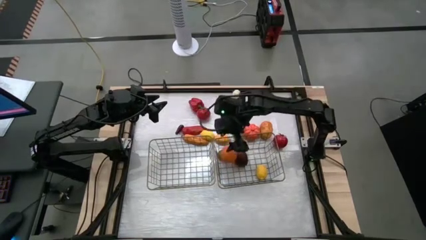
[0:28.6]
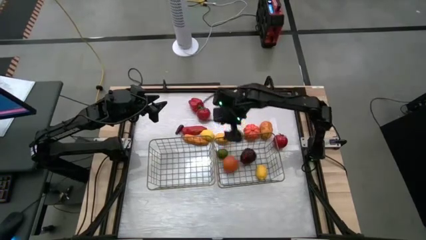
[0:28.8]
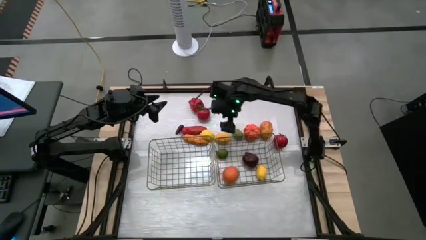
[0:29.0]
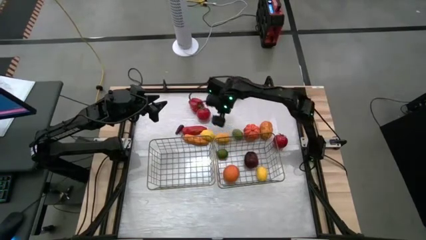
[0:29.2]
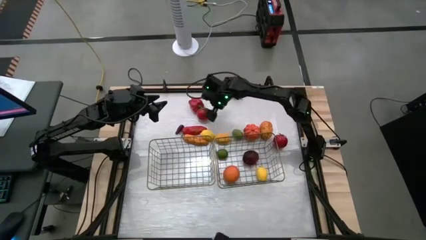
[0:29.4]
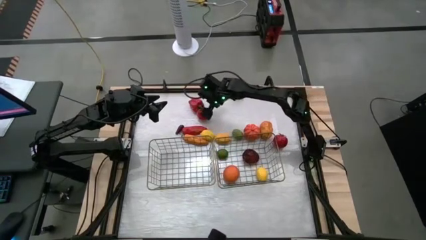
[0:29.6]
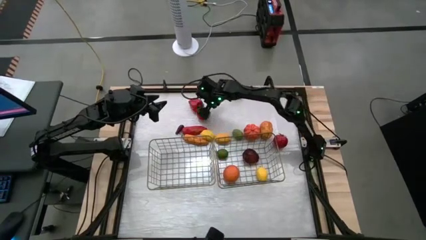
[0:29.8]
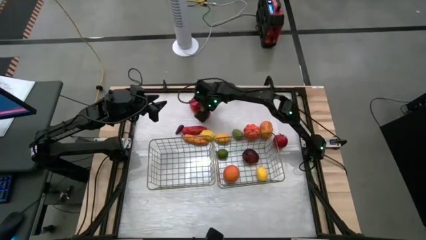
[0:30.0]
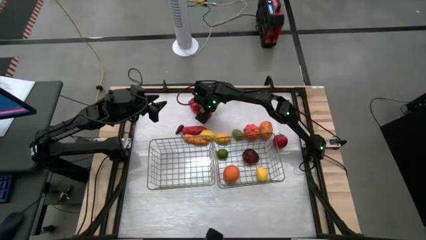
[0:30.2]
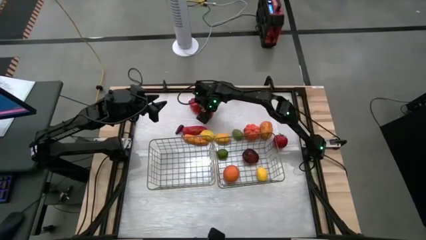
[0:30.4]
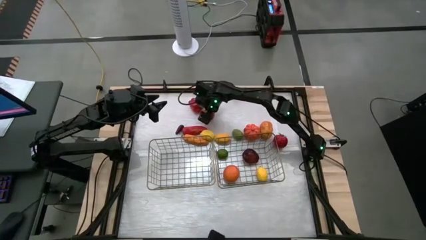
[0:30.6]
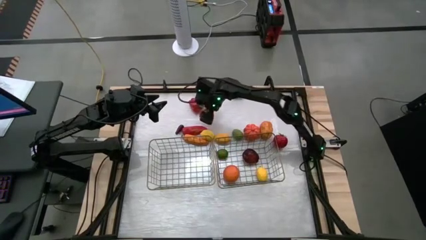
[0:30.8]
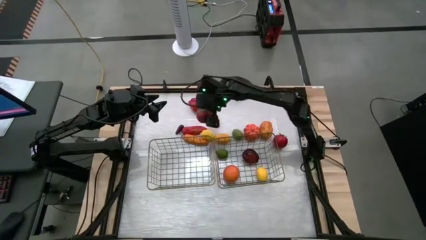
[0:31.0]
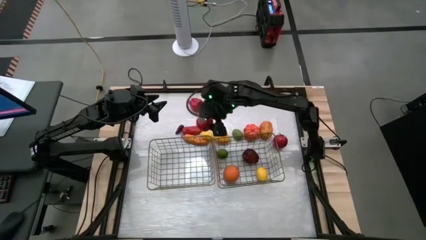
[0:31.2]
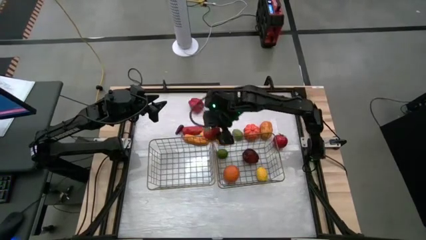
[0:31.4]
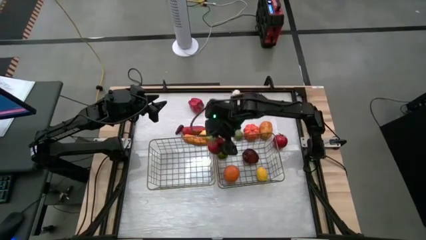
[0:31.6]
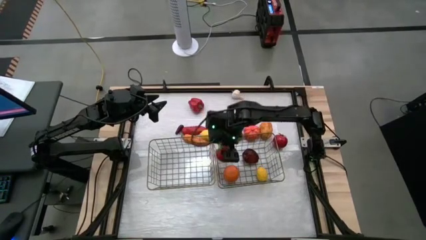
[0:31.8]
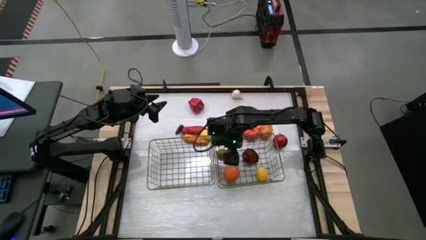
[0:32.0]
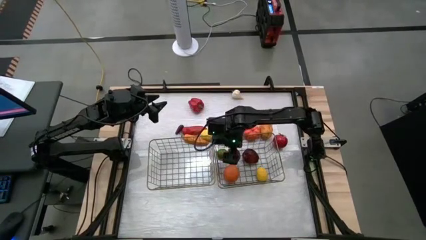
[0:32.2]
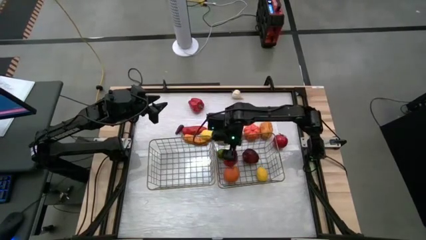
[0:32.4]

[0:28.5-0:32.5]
Task: Sort produce into baskets
Put the top tomato into the right wire basket

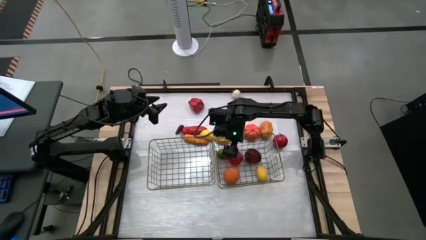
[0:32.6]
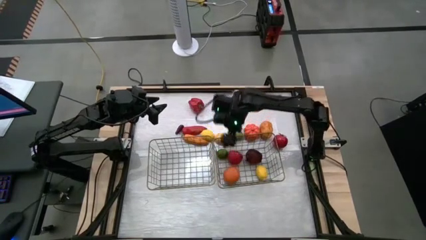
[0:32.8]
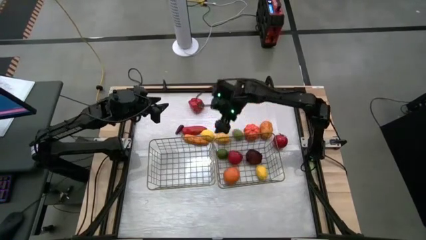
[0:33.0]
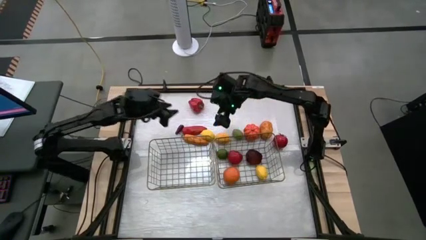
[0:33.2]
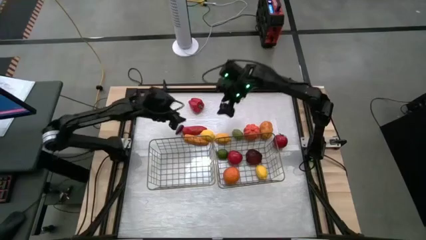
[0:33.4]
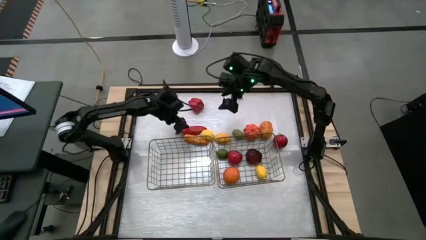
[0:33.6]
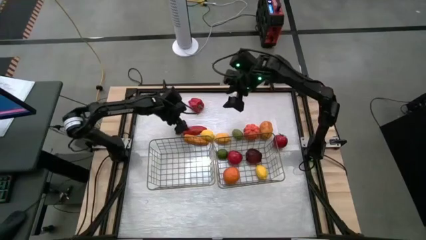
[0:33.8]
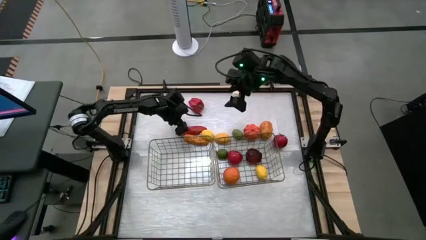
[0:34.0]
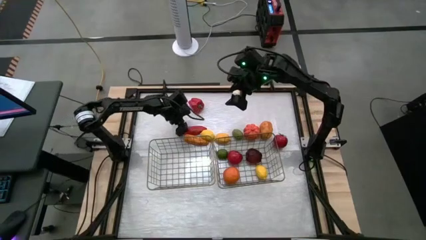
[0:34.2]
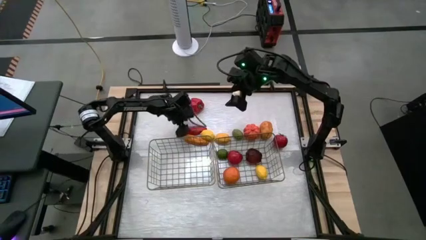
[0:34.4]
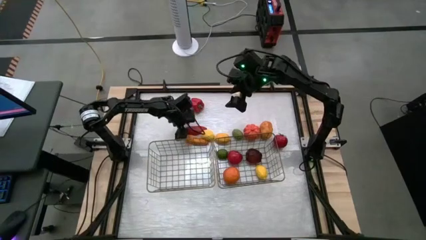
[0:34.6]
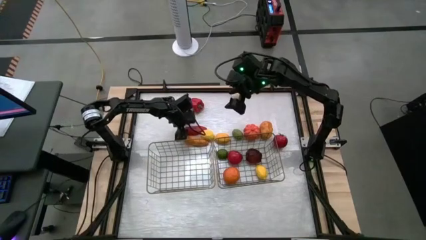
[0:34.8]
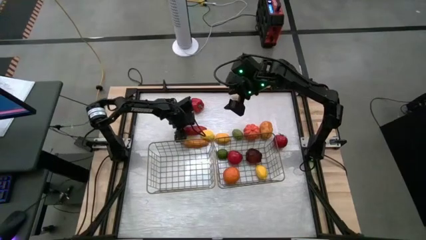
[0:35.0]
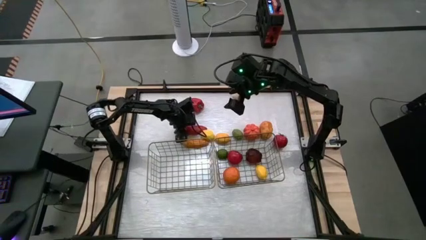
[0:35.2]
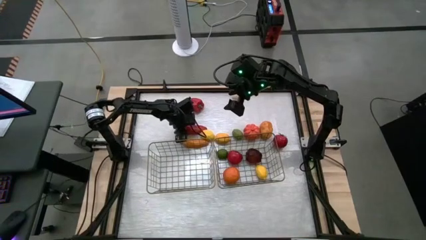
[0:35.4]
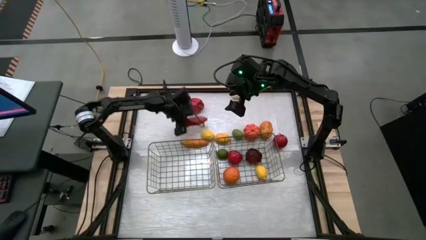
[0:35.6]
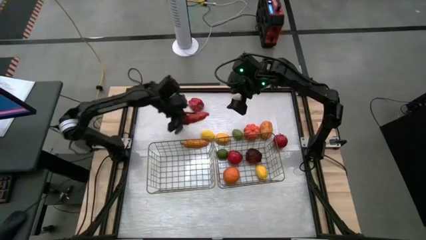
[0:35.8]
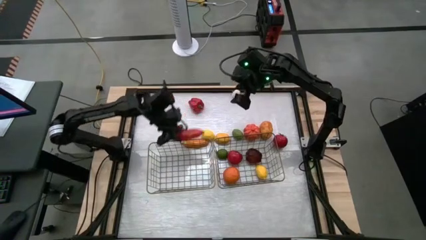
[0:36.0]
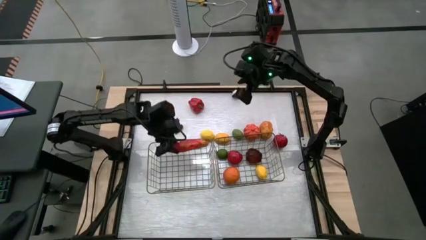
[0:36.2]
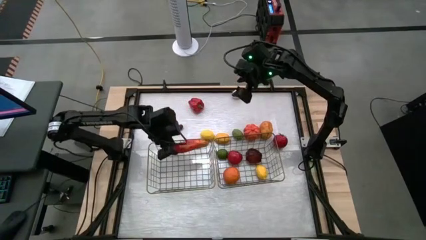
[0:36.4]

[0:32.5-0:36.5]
Put the red chili pepper into the left wire basket

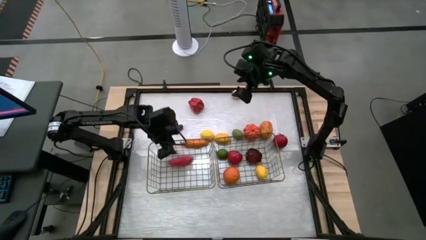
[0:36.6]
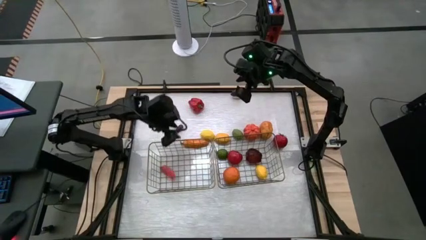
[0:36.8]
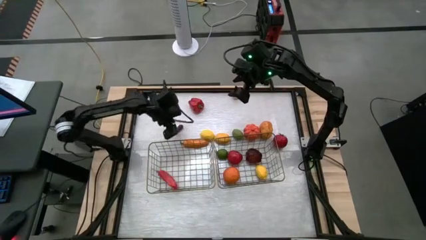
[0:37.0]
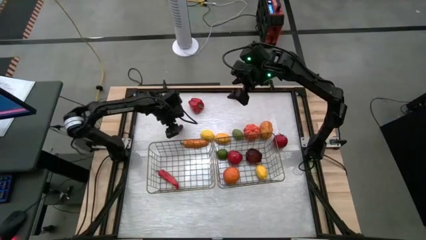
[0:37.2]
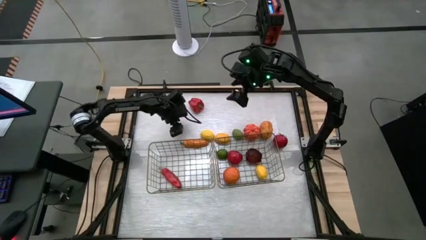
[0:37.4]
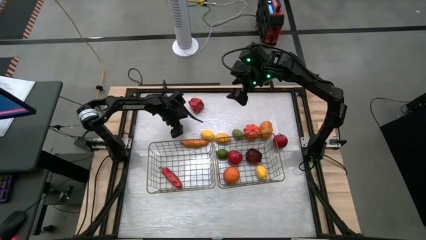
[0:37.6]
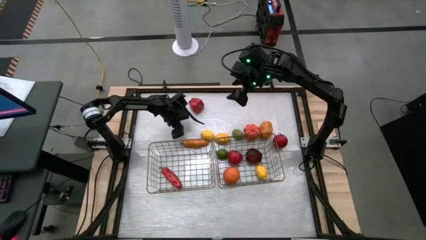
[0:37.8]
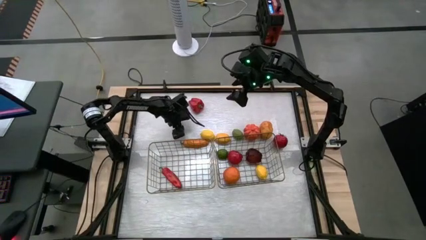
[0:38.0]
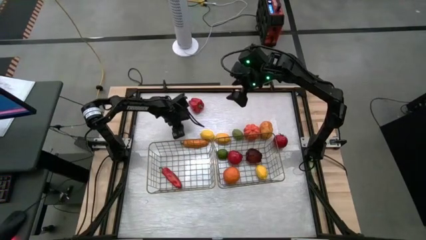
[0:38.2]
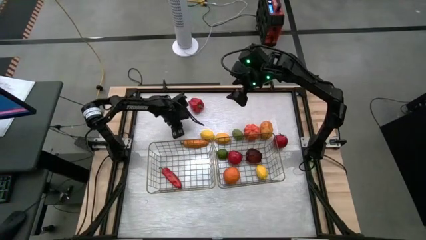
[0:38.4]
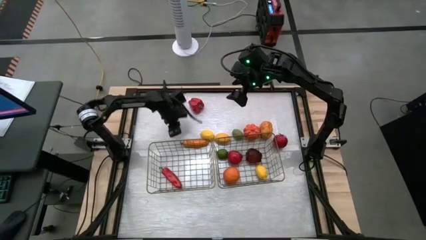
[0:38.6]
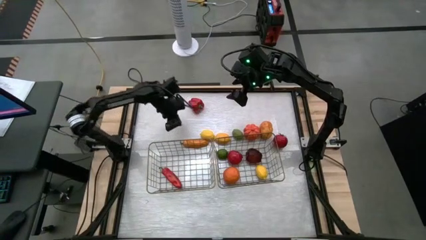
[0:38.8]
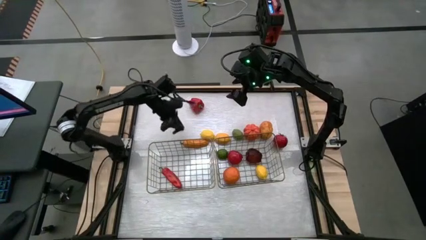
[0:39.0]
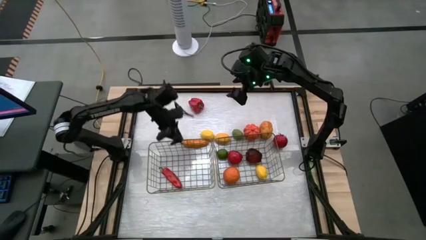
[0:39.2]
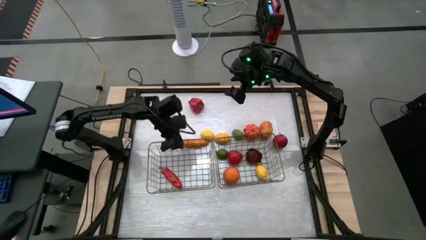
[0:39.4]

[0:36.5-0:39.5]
Put the eggplant into the left wire basket

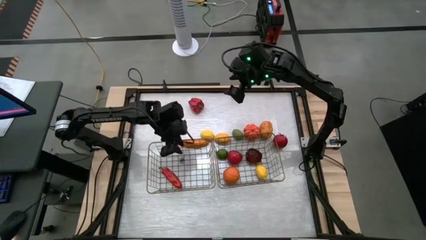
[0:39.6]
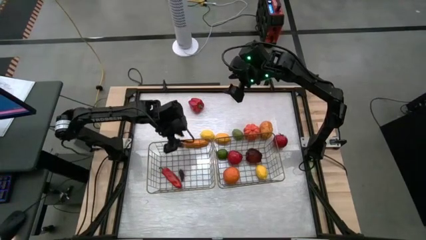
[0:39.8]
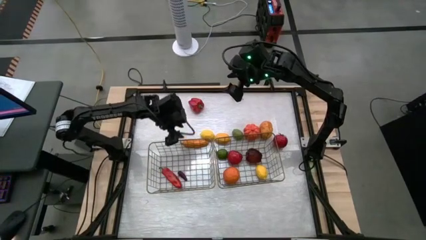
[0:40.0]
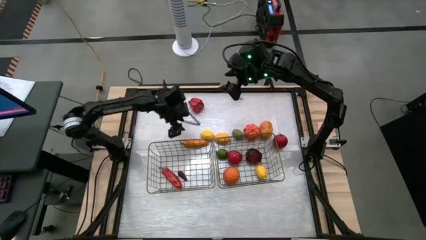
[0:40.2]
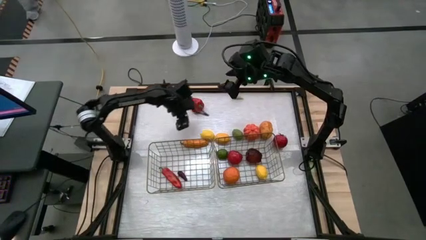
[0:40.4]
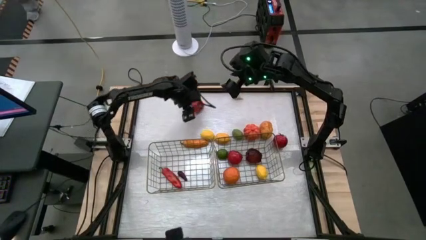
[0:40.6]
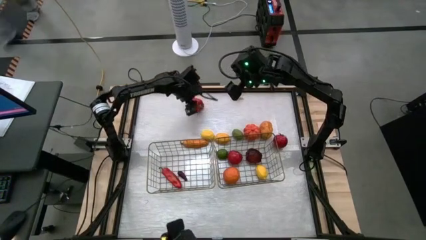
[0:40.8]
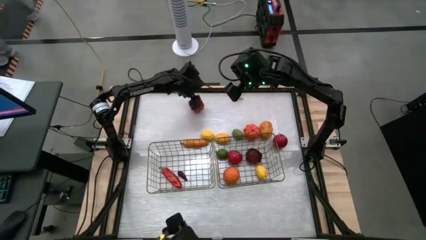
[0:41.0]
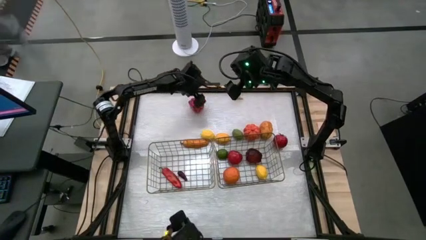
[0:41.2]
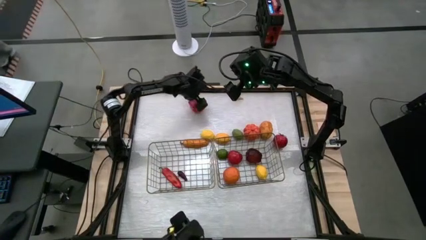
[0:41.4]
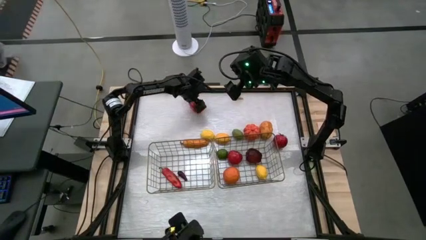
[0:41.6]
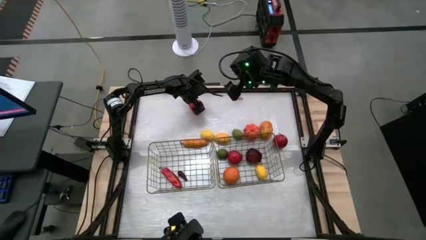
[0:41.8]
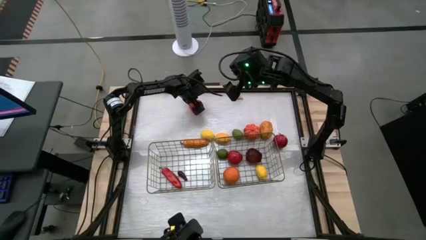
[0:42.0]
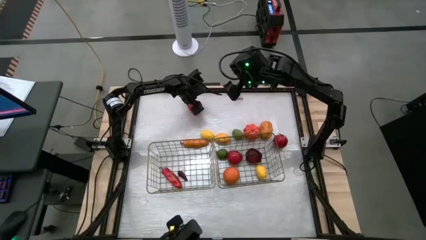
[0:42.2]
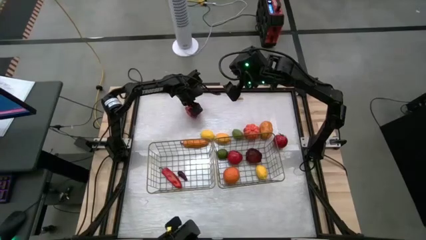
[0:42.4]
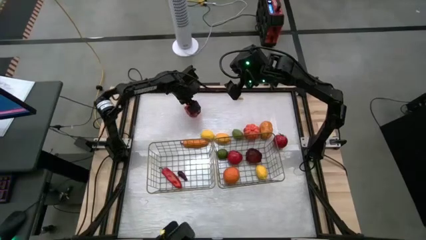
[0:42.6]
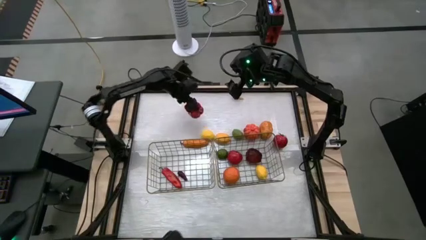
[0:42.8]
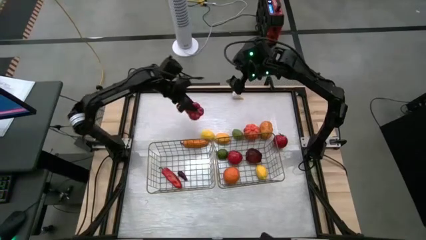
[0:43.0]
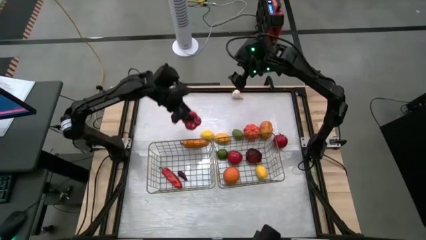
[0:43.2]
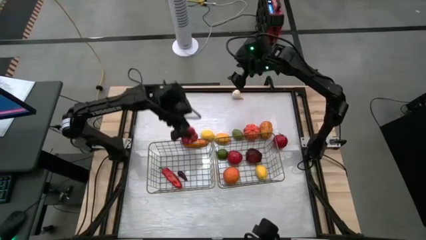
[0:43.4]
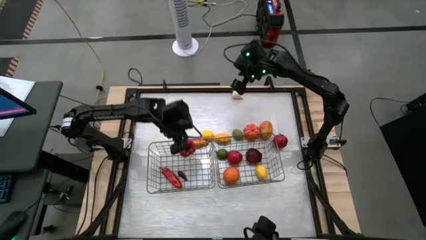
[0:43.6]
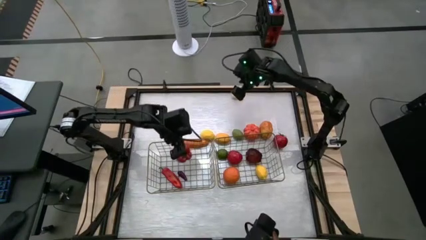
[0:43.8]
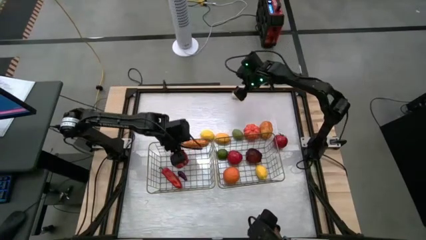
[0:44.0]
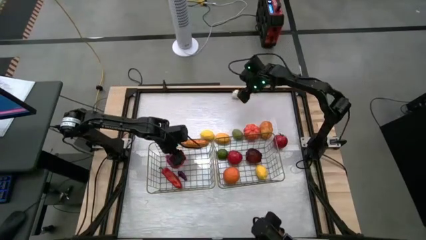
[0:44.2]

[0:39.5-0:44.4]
Put the red bell pepper into the left wire basket

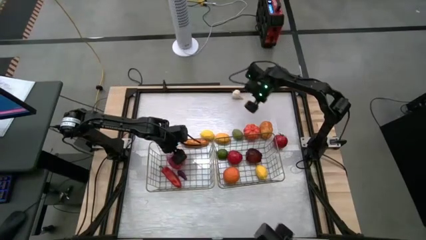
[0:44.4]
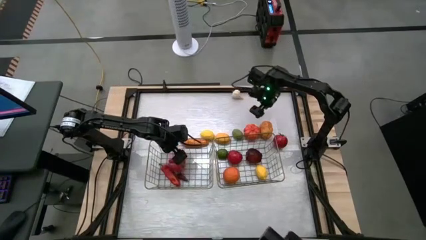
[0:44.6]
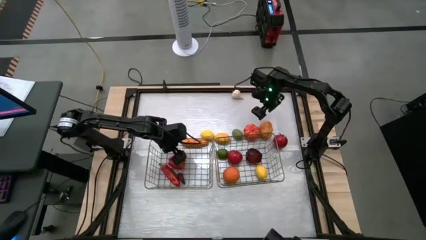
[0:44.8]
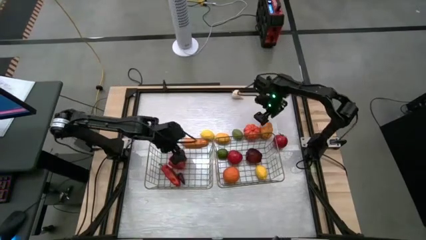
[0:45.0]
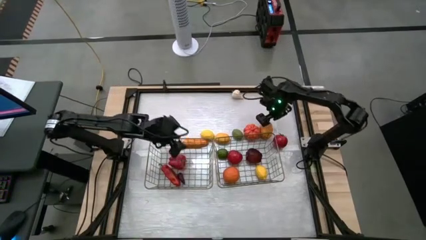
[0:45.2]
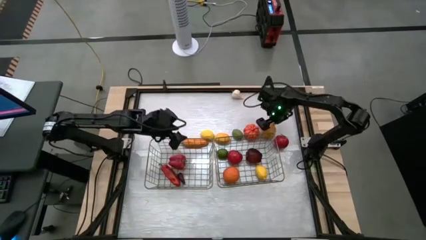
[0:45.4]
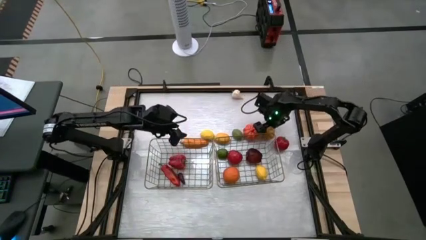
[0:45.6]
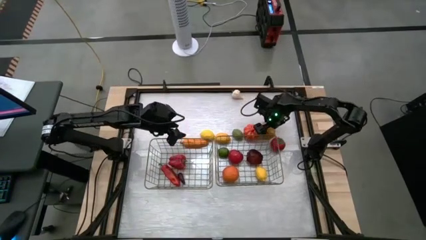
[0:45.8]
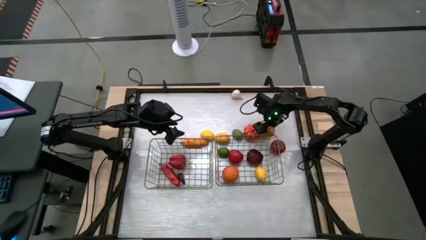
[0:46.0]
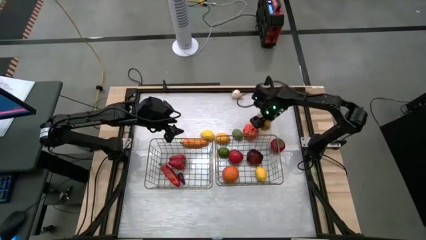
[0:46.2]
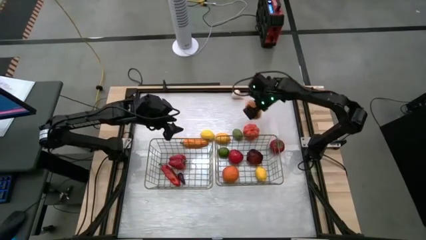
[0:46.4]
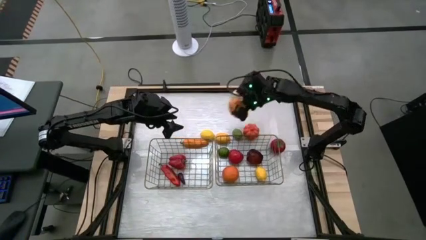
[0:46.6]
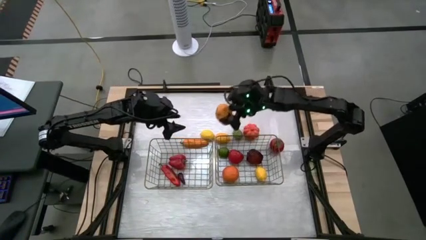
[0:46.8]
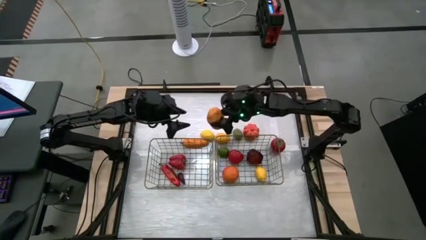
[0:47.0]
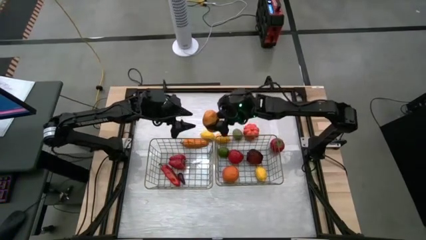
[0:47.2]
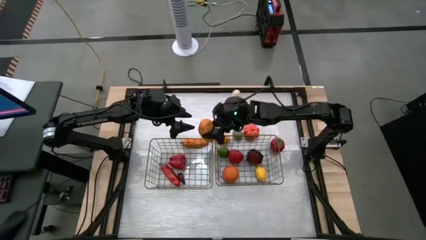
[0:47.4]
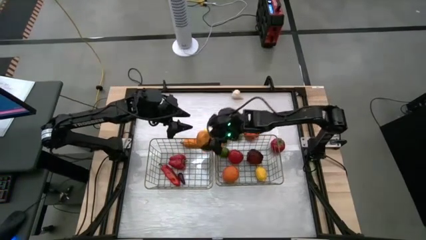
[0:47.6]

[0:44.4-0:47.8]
Put the potato into the left wire basket
